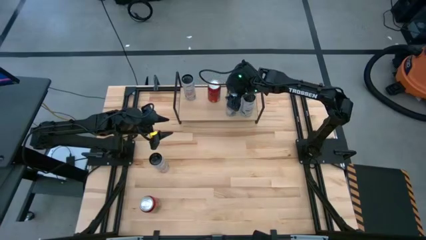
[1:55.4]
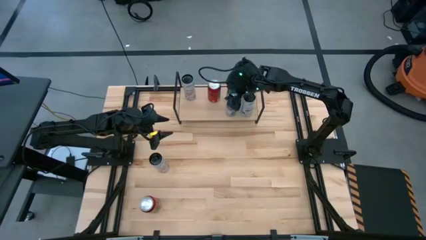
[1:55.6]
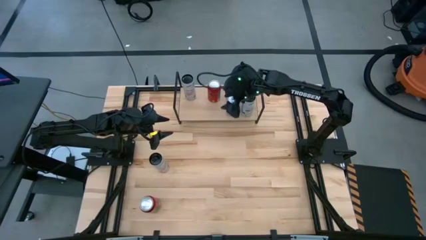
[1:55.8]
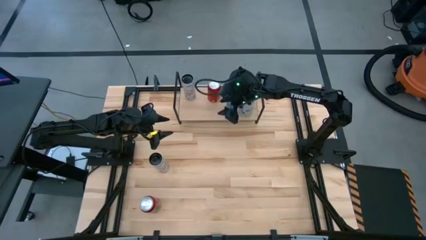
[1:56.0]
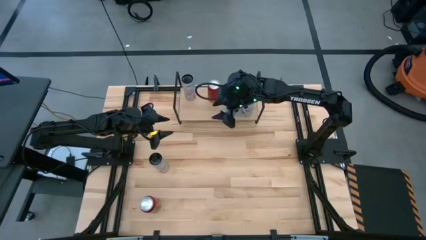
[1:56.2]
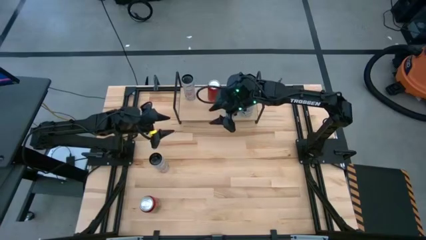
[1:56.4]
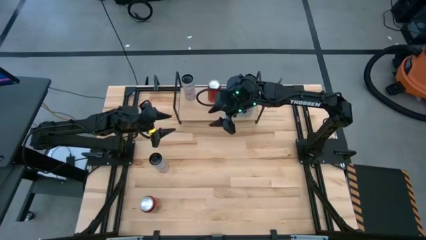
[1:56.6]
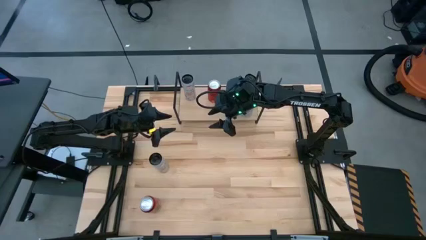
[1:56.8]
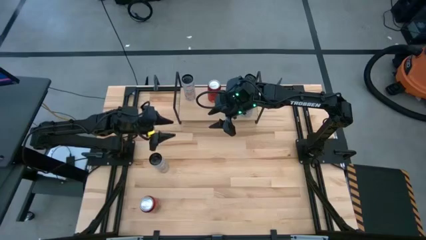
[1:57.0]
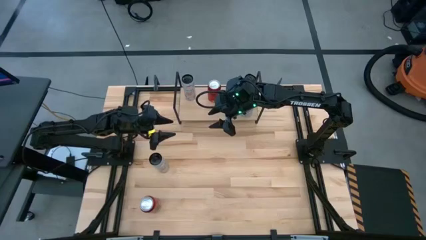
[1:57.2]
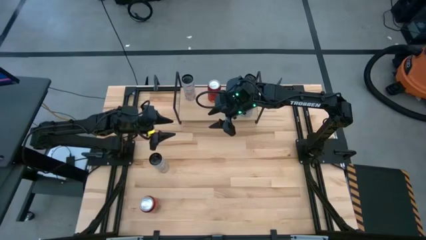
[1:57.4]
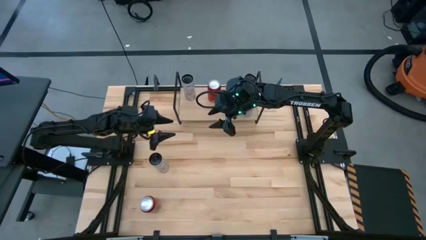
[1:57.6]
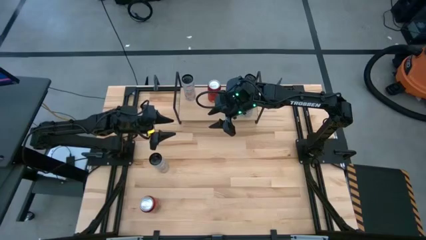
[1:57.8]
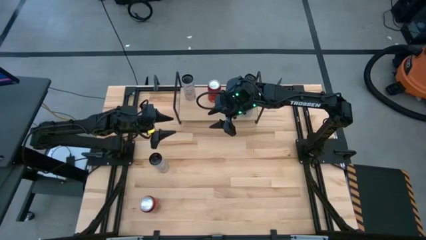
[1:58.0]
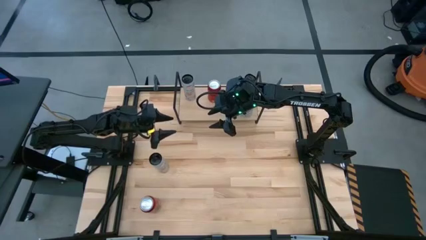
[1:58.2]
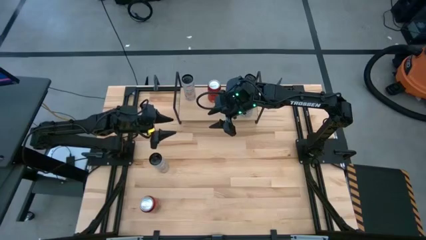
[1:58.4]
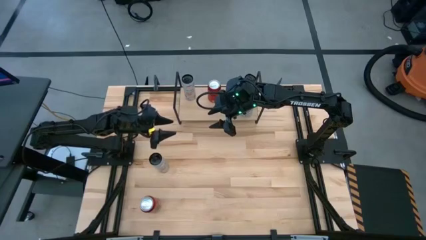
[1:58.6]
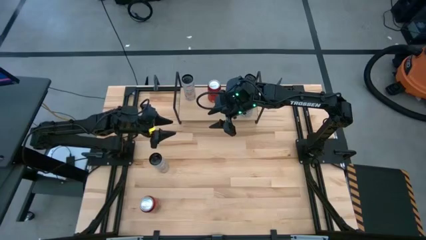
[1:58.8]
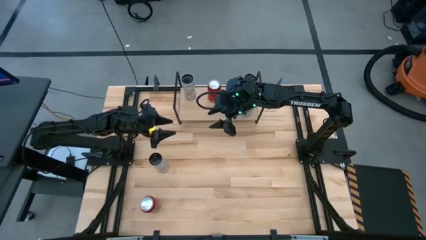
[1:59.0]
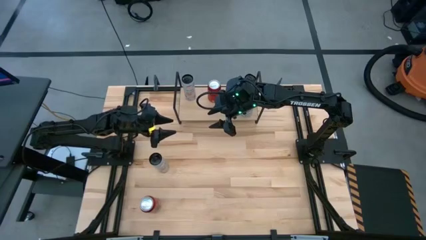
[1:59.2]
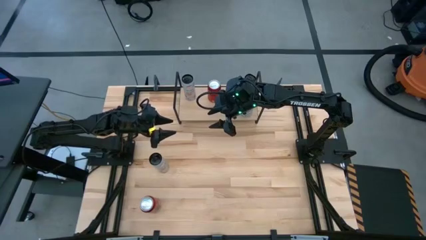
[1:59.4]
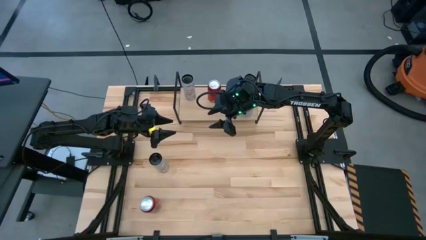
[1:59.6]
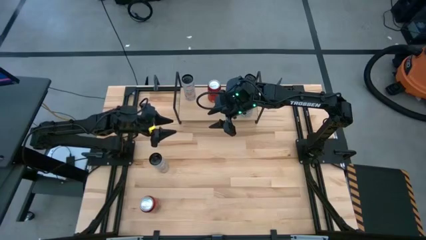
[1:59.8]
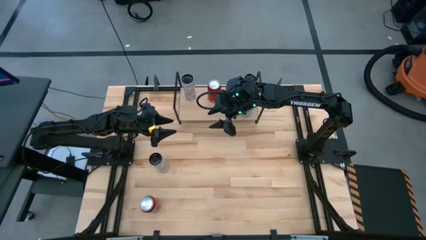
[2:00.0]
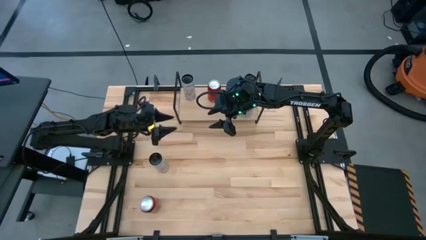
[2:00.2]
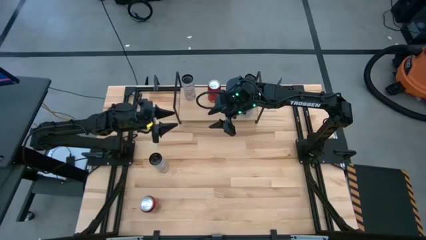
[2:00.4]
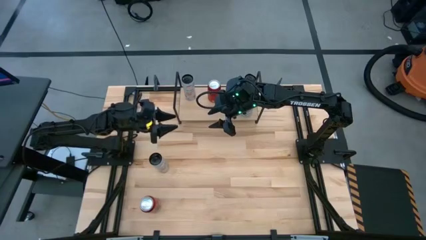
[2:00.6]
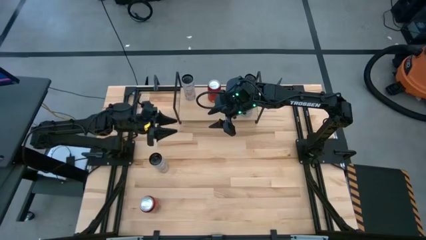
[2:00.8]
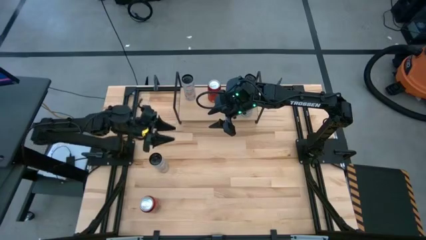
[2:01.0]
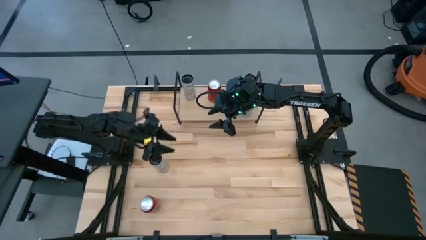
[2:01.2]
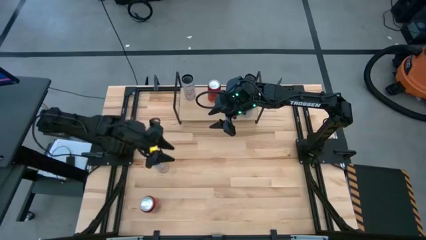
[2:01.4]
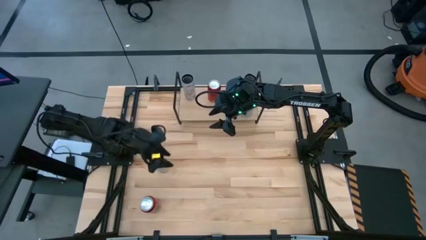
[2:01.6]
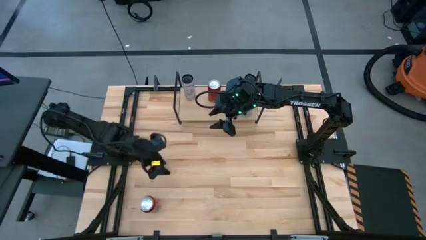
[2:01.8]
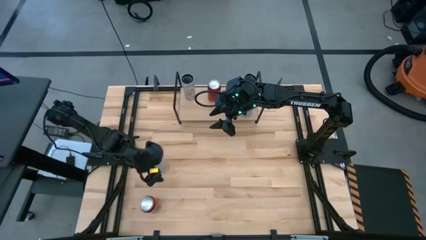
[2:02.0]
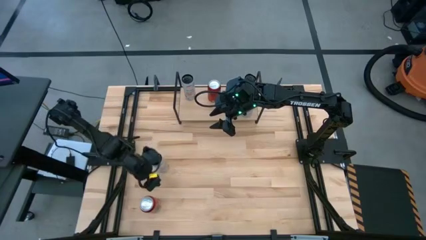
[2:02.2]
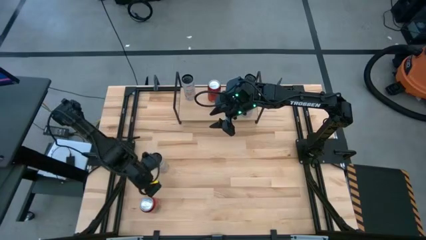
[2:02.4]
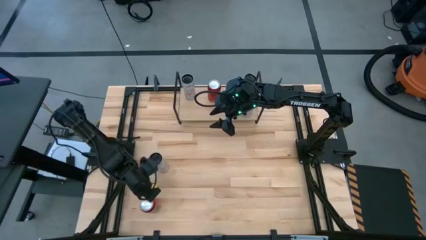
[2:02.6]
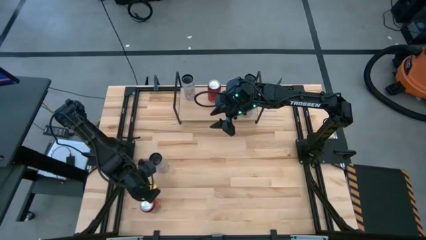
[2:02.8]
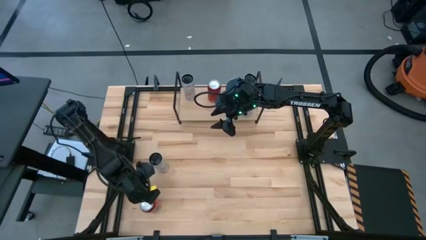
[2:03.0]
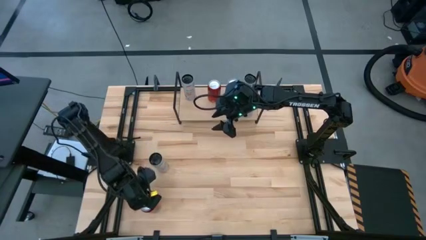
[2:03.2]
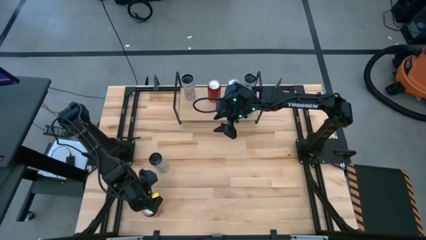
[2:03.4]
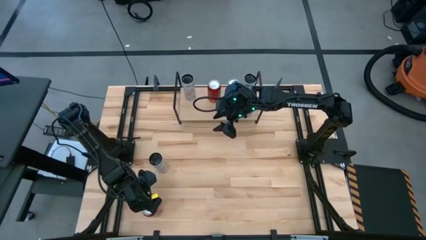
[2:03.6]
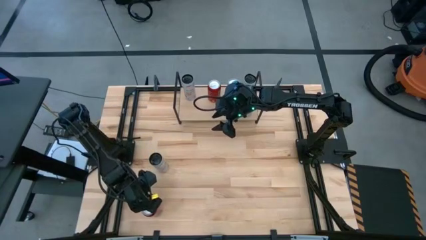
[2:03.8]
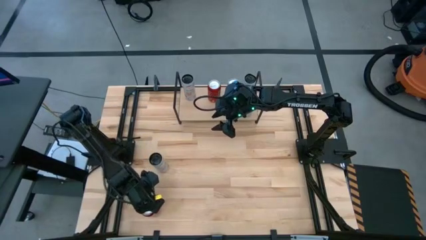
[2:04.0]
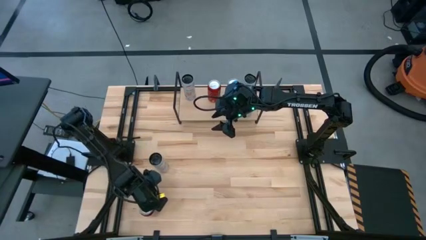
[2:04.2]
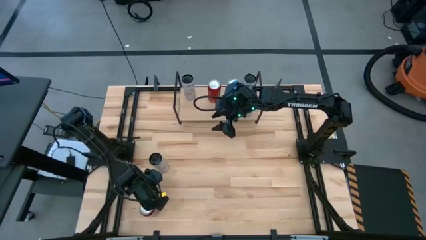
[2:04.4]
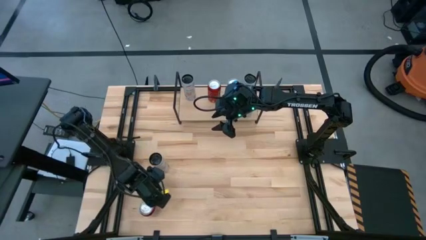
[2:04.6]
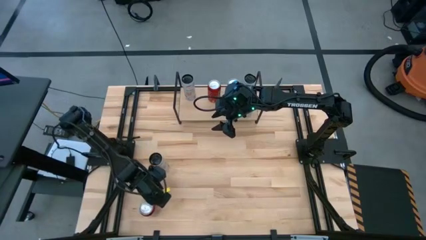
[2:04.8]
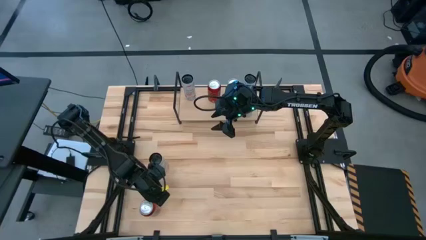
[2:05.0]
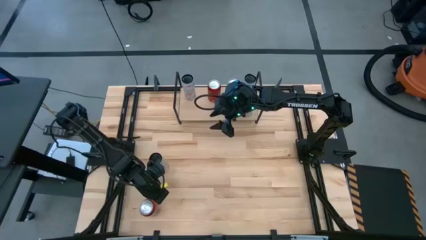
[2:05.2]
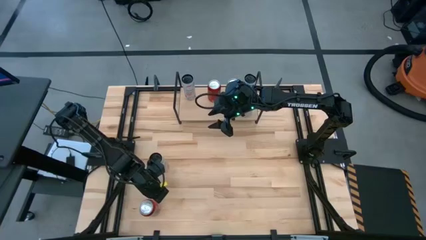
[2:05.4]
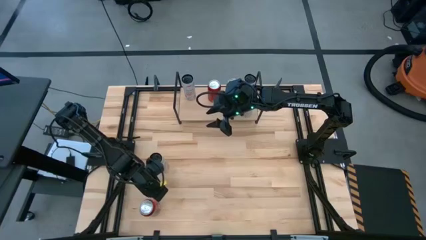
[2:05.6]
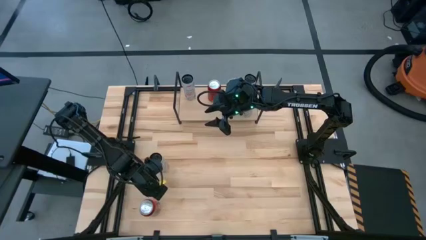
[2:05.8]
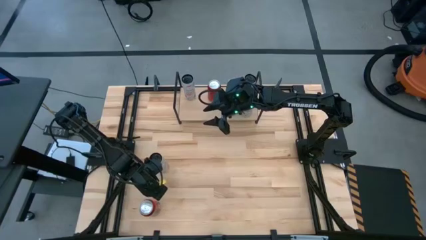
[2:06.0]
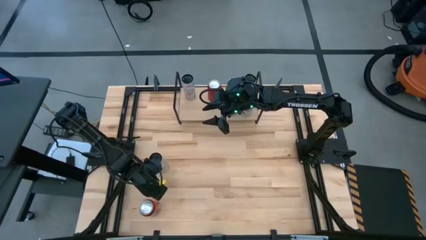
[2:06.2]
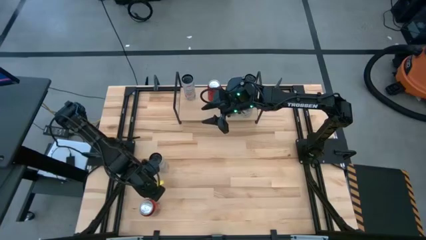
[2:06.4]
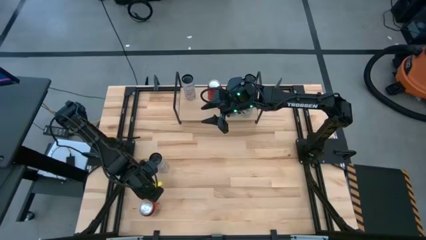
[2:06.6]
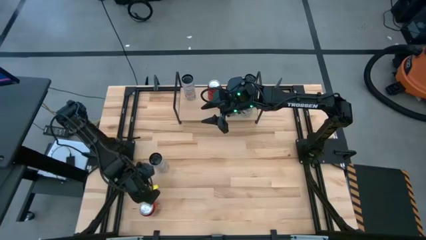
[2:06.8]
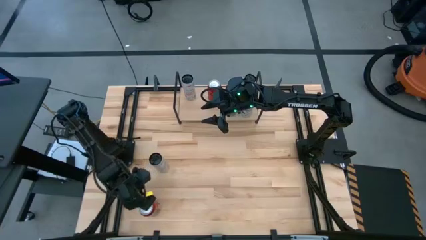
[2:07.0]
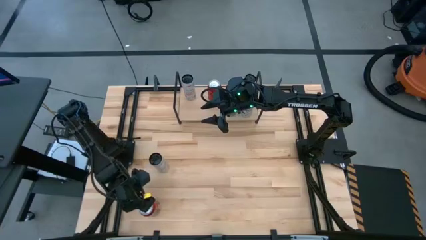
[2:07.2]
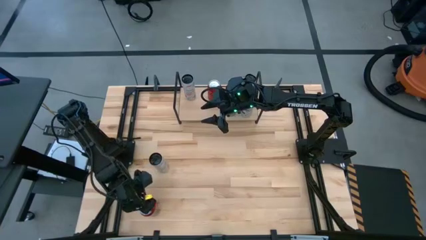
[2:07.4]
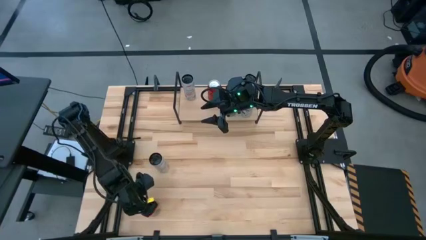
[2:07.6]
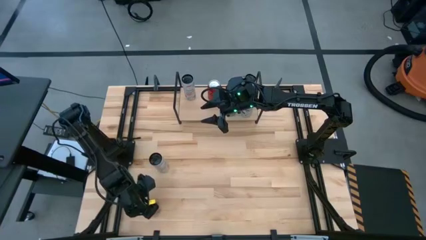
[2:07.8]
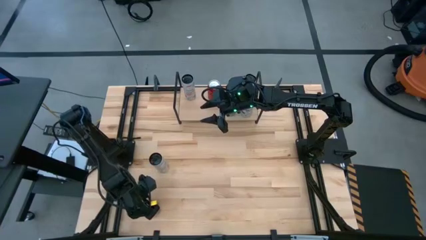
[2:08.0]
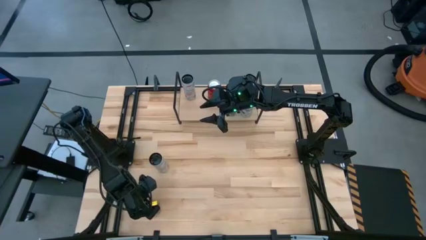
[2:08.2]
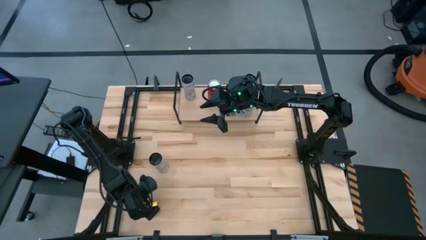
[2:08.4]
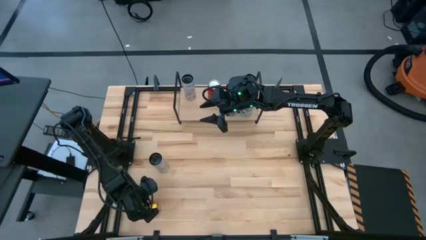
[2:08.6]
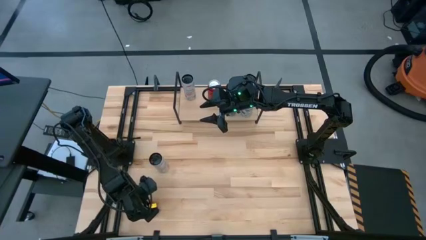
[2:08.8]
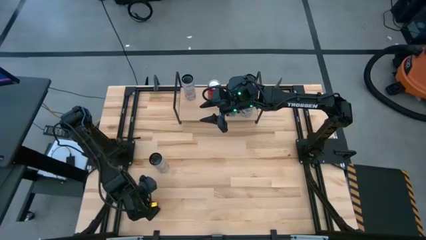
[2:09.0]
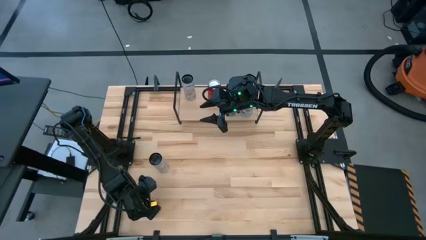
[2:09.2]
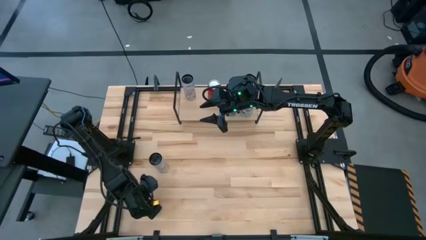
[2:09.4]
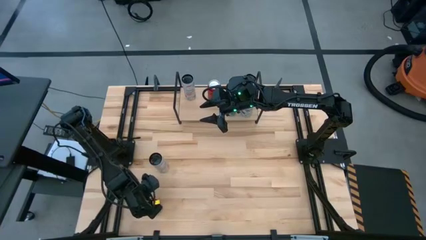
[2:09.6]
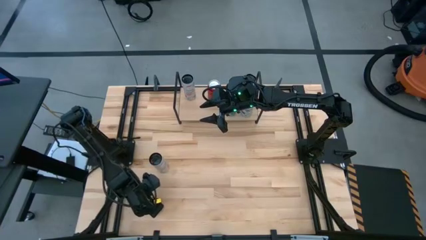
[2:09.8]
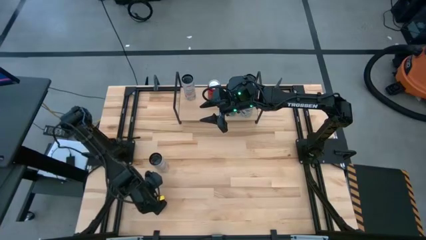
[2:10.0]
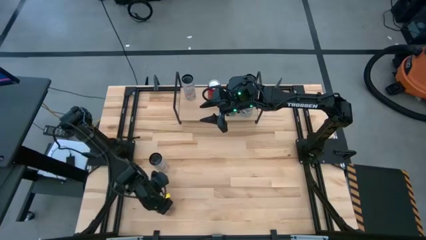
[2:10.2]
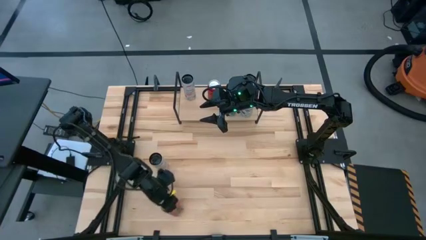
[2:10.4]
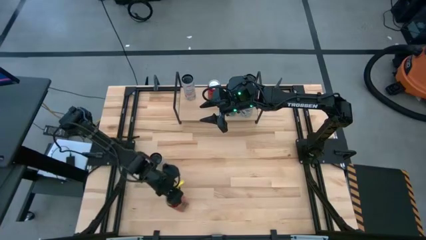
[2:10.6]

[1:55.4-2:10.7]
Task: Place canned beverage on shelf
Put the red soda can on the shelf aligned with other red soda can

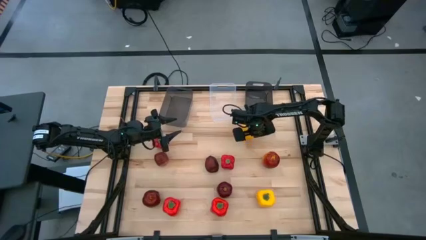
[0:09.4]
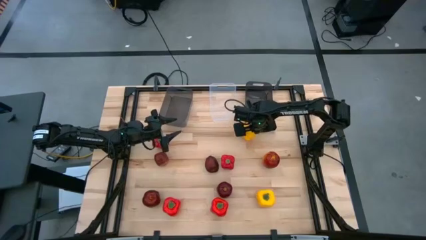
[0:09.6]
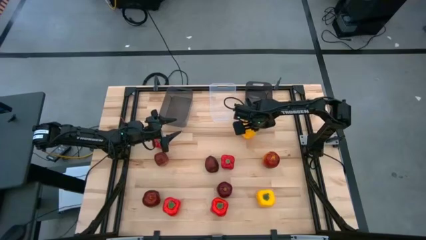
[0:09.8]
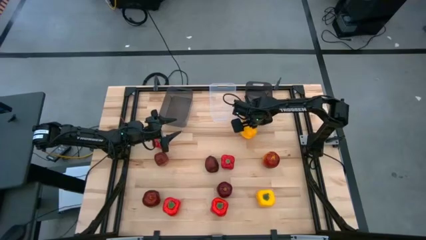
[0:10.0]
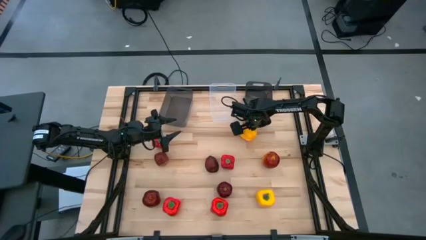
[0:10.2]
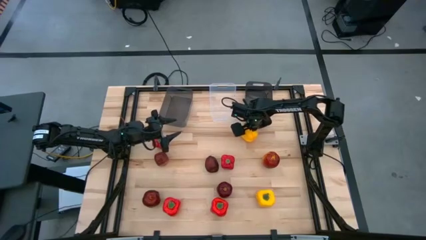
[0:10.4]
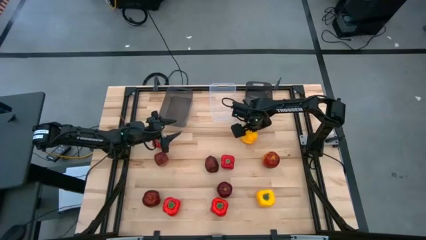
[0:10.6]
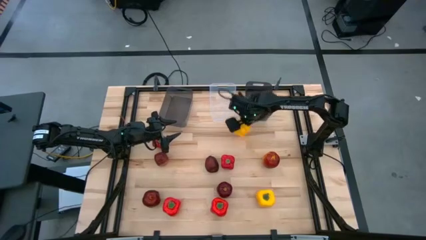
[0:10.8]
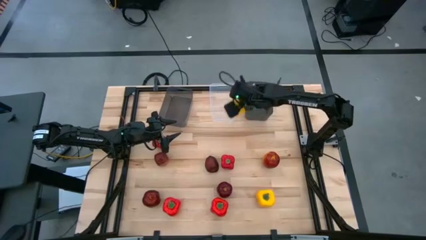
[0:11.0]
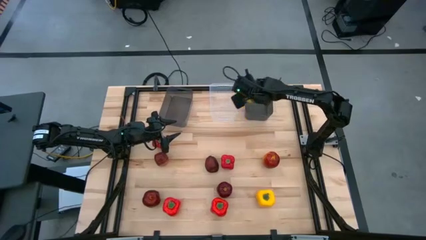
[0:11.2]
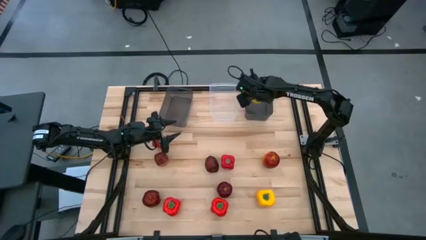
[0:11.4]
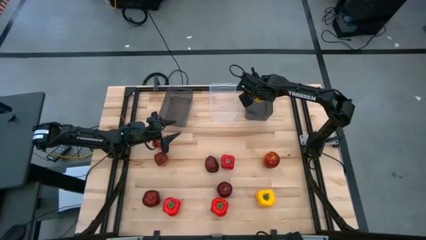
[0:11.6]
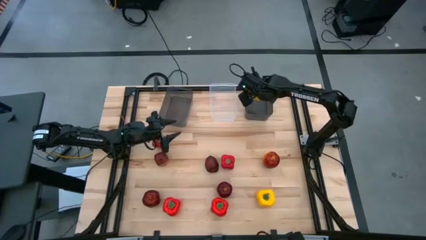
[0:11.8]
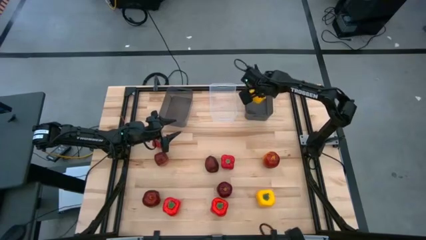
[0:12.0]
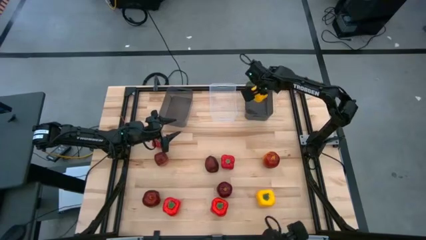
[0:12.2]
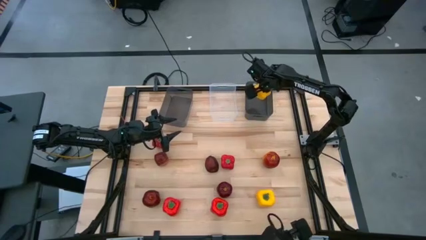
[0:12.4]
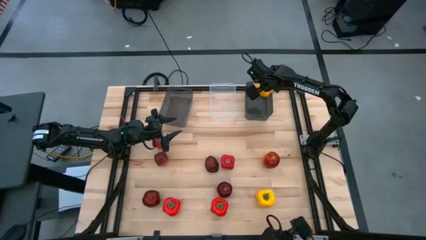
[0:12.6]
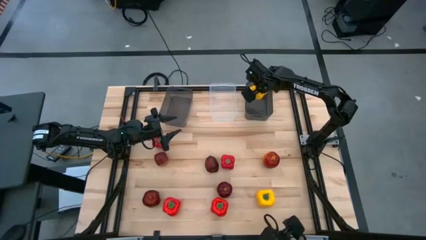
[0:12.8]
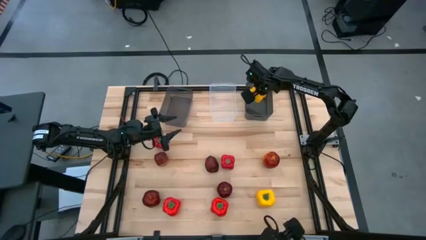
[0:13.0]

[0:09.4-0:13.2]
Task: Sort produce into baskets
Put the top yellow bell pepper into the right black bin
